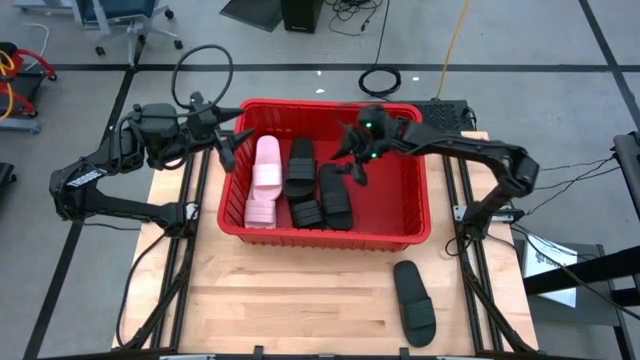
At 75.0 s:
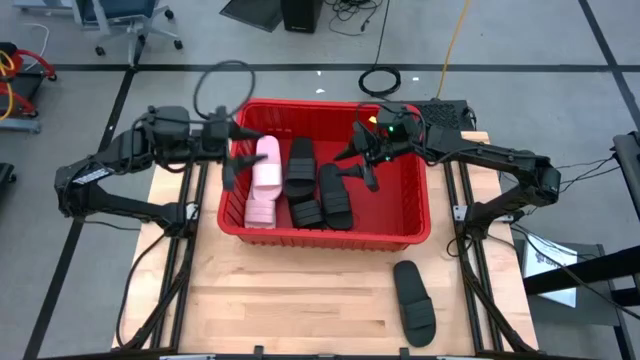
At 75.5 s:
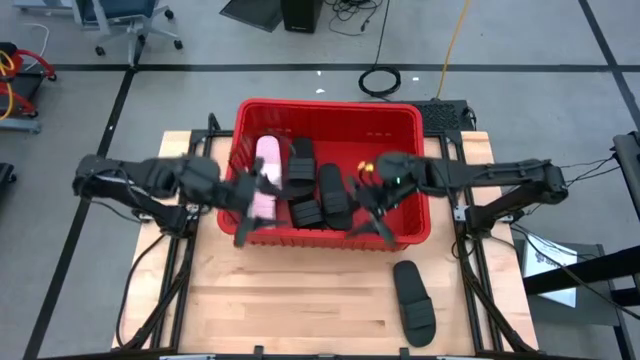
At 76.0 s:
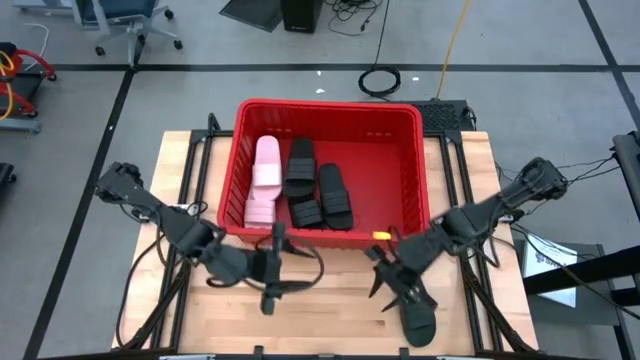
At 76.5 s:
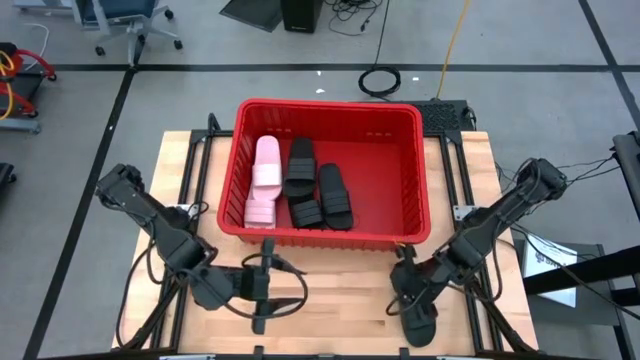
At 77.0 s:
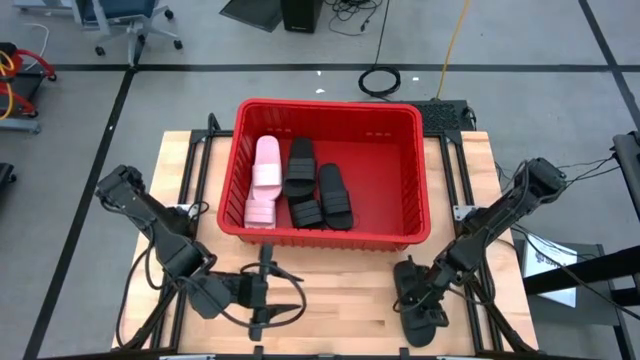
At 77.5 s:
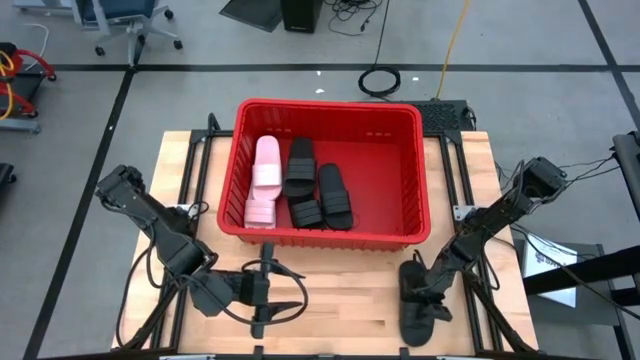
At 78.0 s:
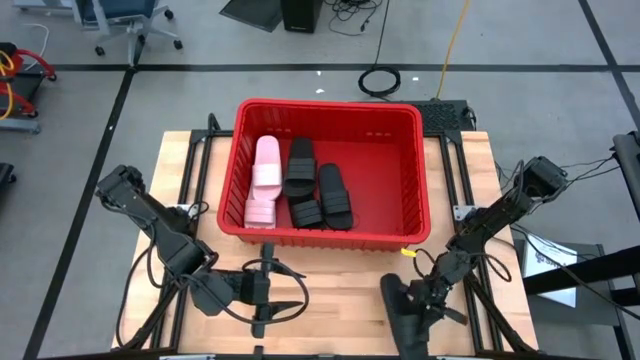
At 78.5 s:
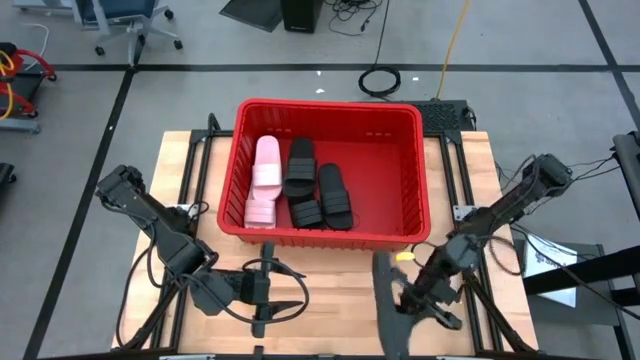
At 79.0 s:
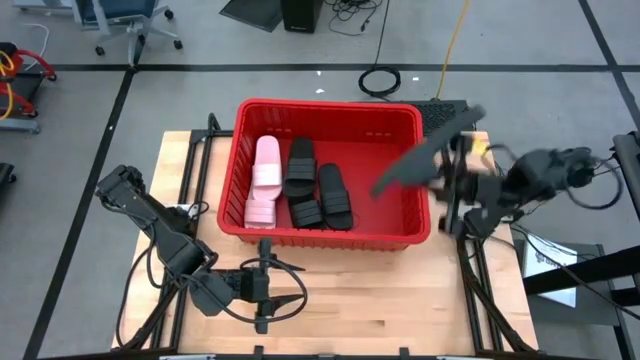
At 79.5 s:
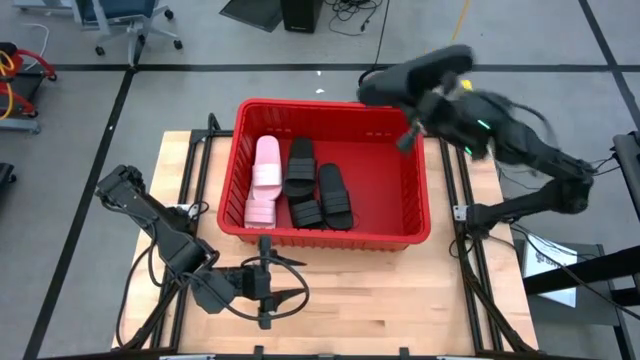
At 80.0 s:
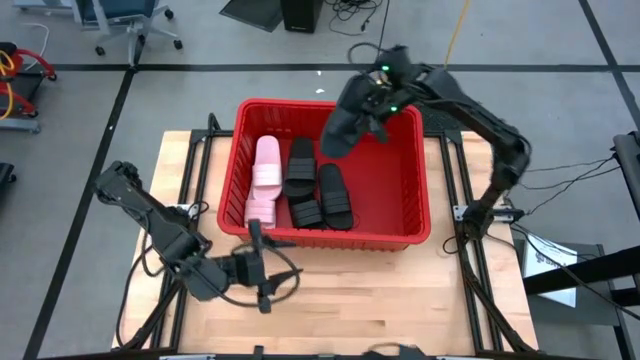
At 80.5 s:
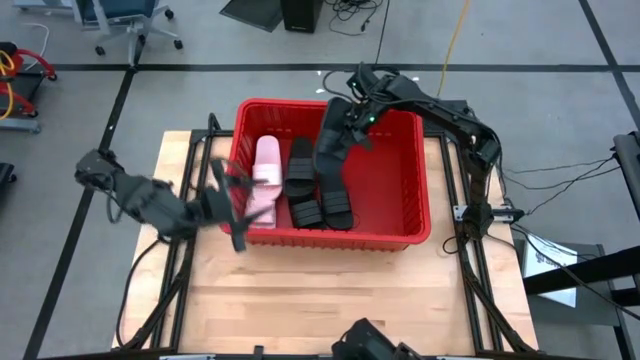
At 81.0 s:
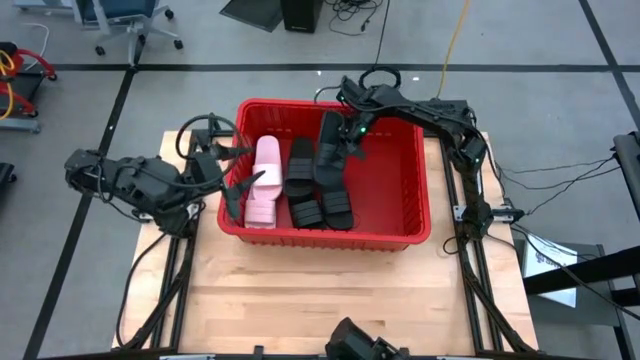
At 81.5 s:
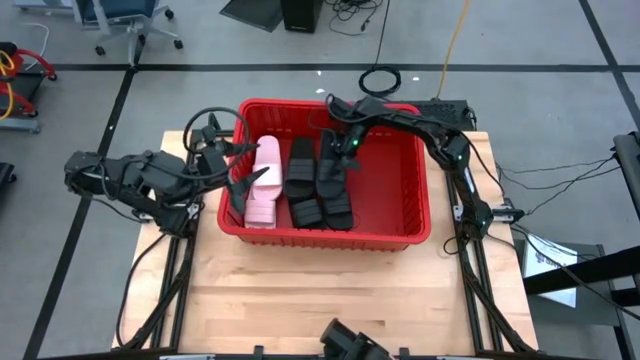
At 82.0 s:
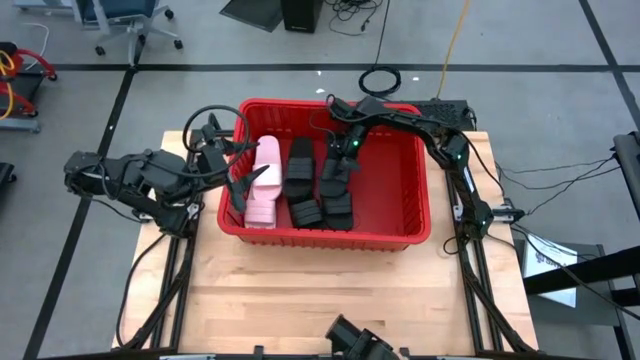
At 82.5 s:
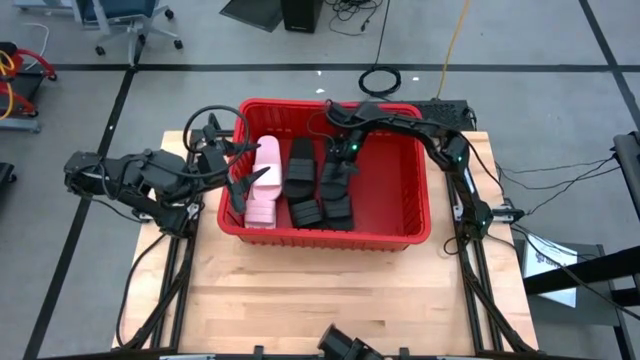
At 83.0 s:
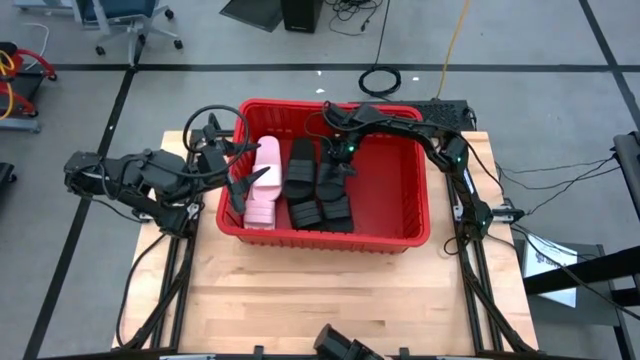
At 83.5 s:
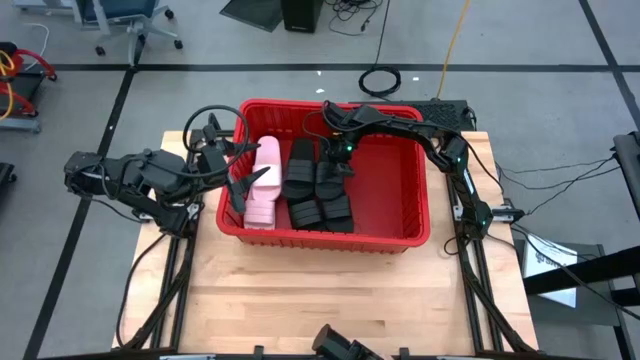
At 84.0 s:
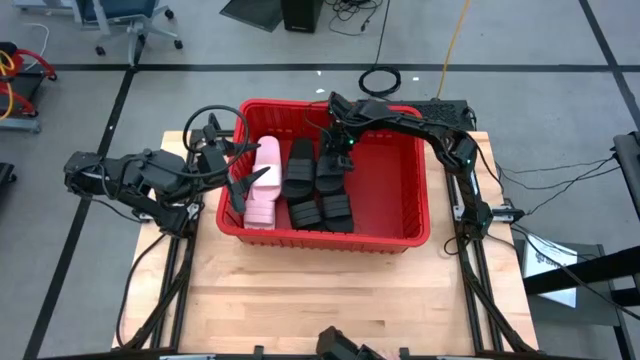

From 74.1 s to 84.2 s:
Task: Pick and place slides into bin
Put the black slide into the red bin

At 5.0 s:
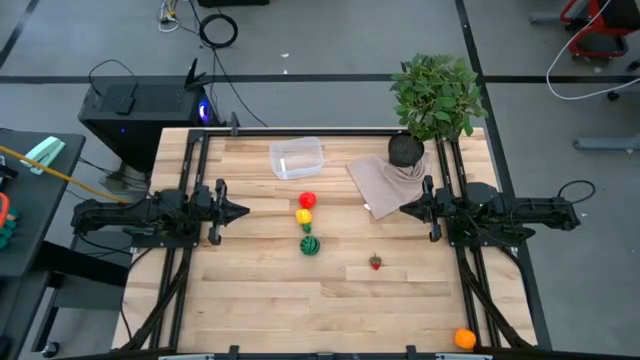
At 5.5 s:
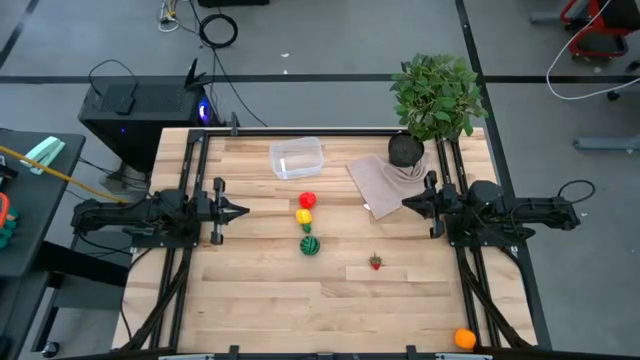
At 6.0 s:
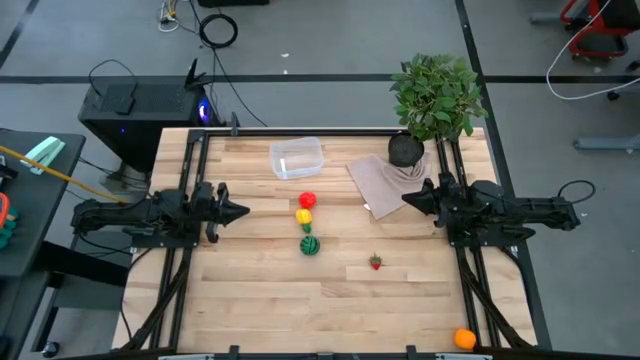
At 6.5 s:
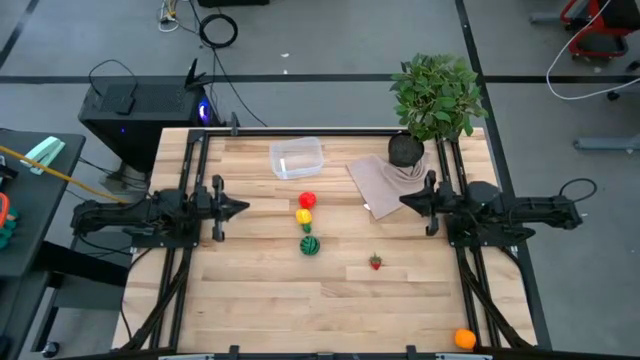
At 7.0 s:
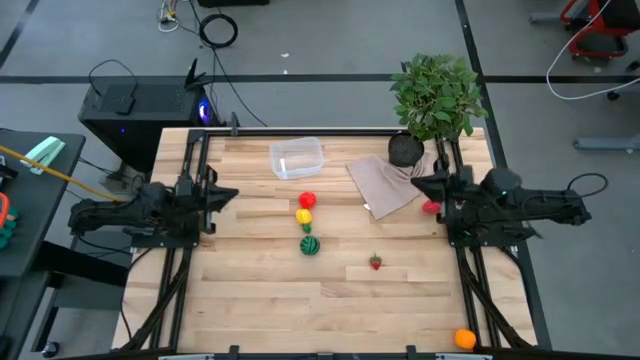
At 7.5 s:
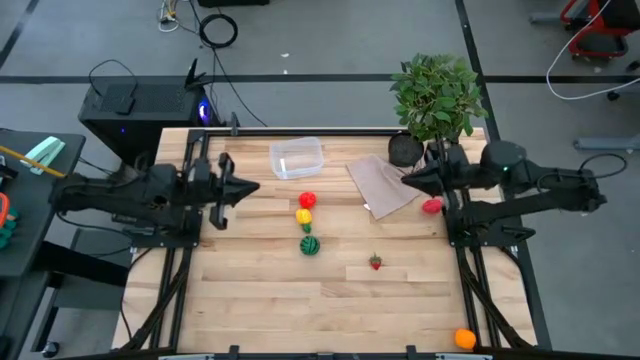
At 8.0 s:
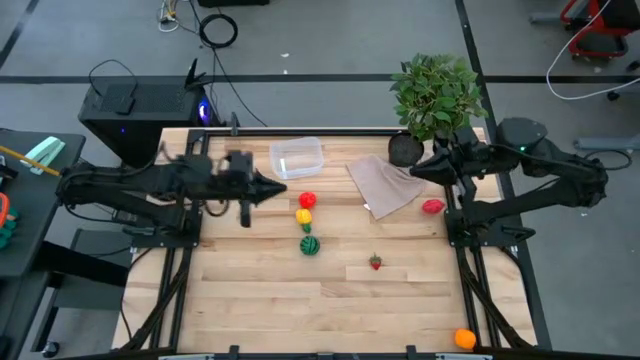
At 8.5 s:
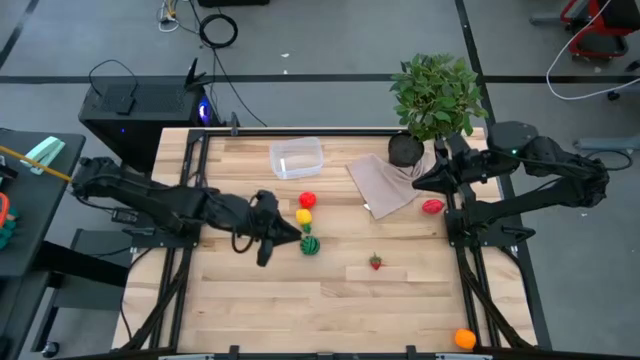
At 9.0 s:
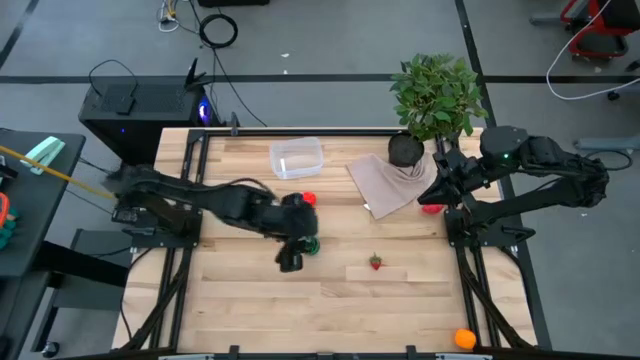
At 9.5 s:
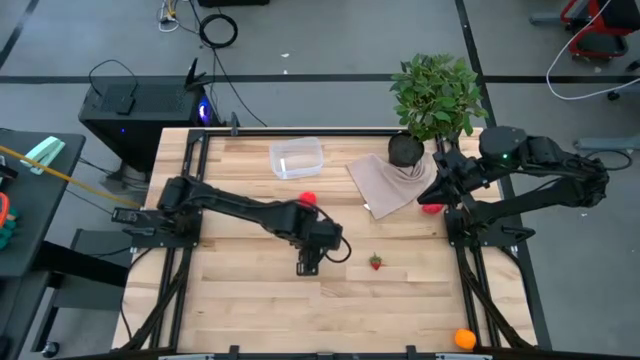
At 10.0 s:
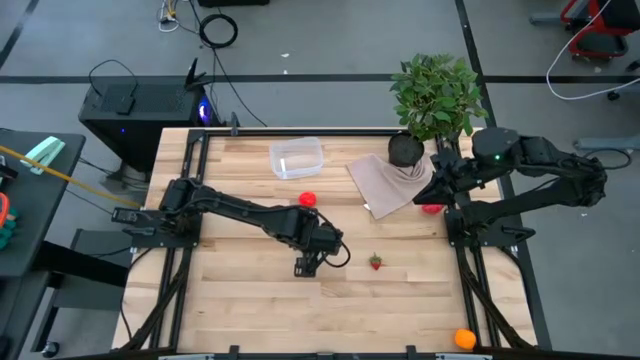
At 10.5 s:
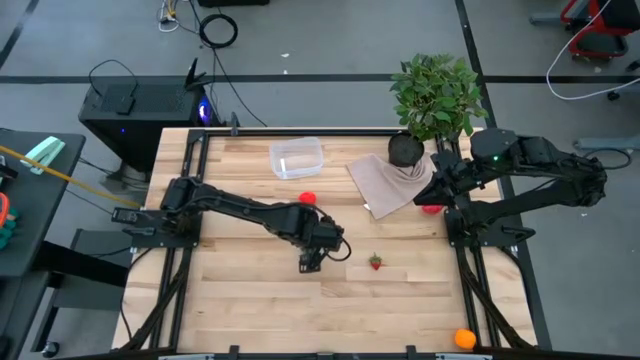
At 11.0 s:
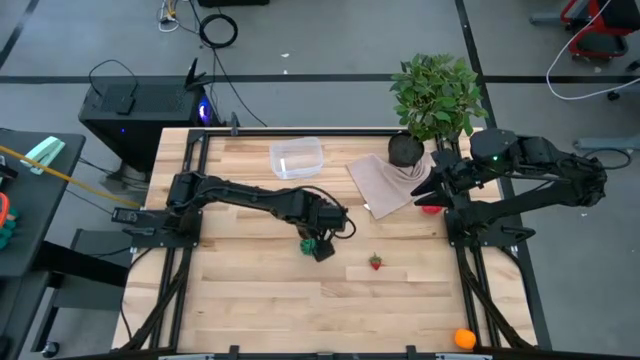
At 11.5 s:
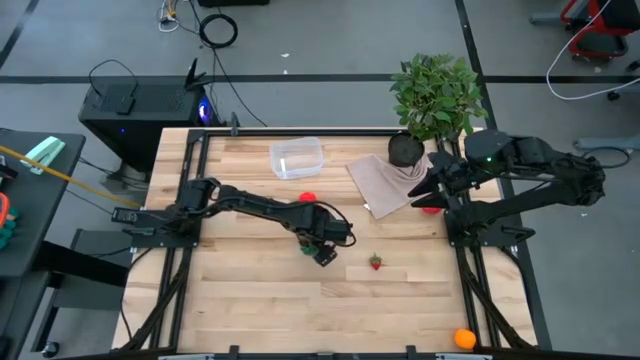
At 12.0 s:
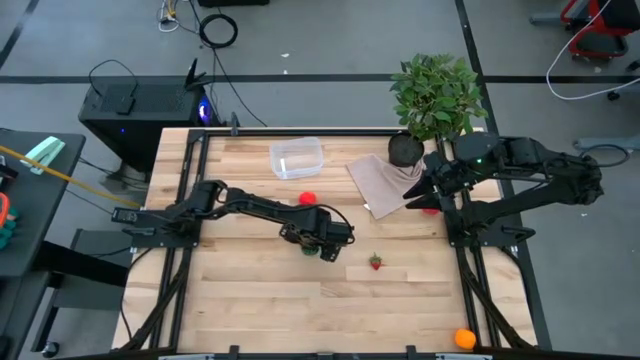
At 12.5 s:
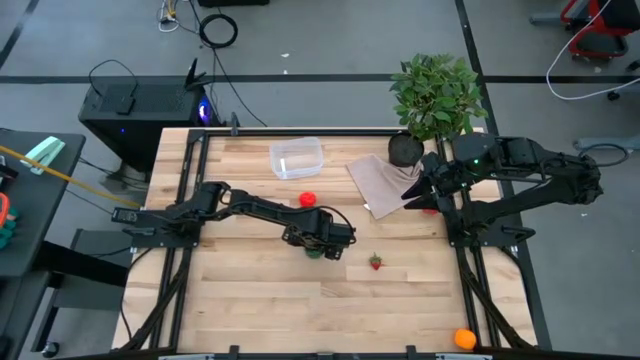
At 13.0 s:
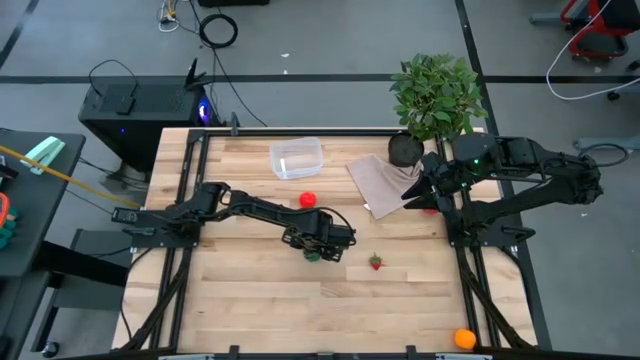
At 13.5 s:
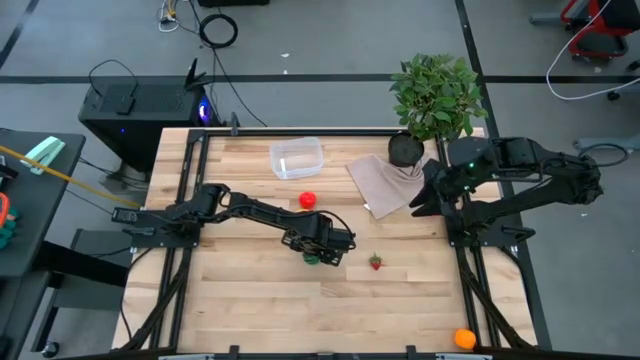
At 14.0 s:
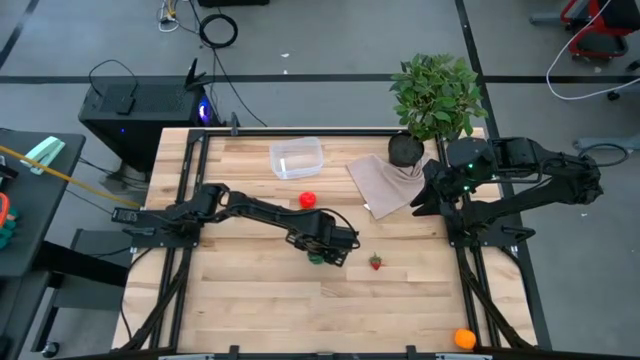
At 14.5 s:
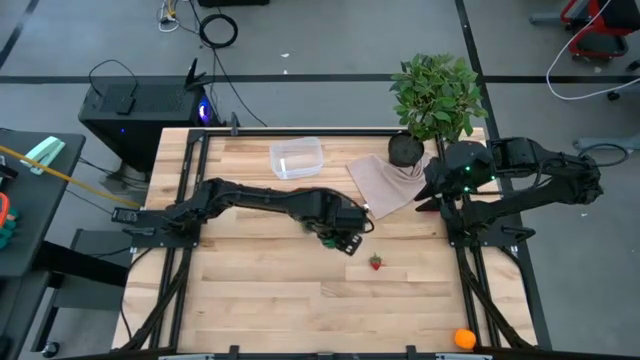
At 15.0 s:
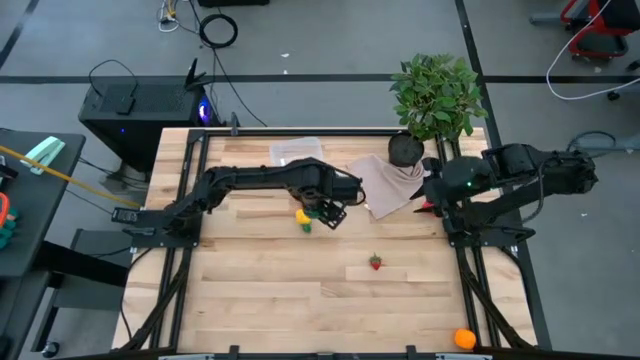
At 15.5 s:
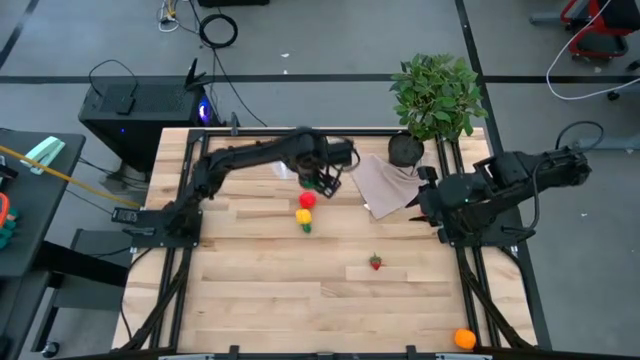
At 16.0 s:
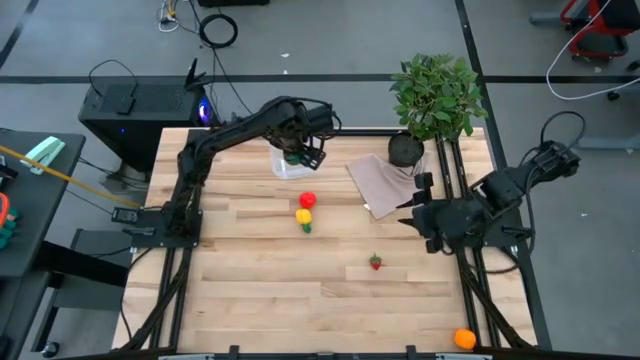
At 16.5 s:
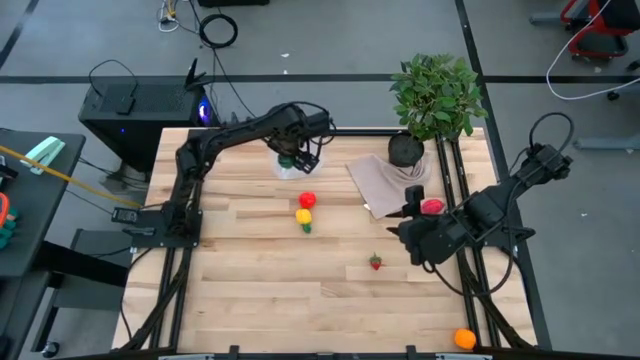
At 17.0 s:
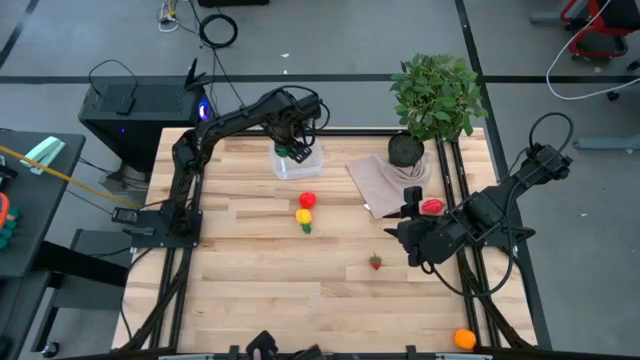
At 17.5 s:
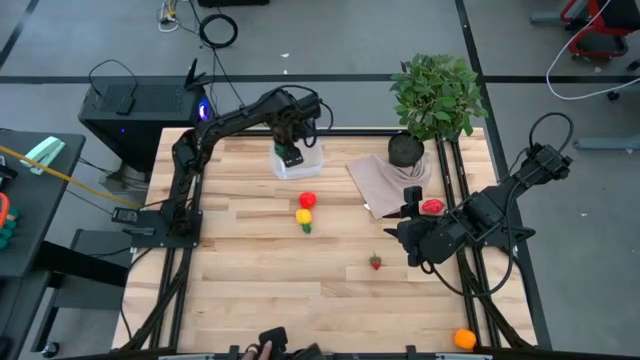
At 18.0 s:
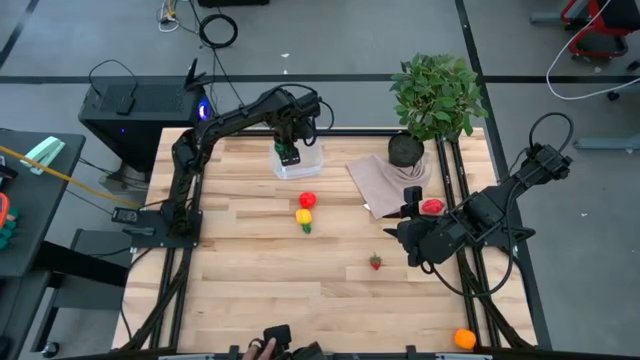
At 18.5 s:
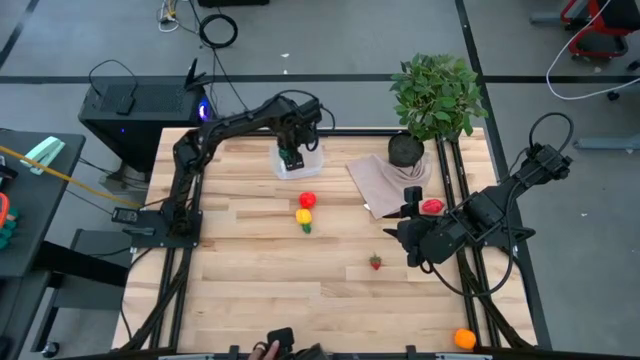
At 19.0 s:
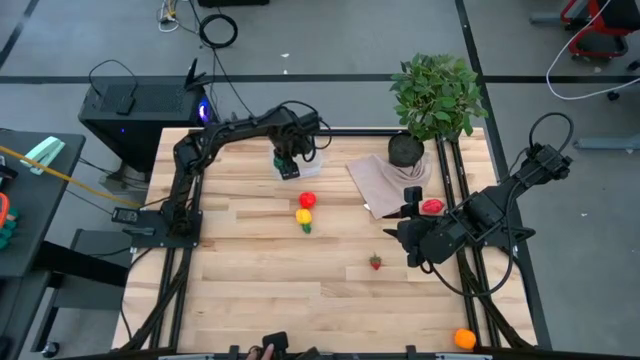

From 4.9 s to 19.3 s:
Task: Pick and placing Produce into tupperware
Put the green watermelon into the container
